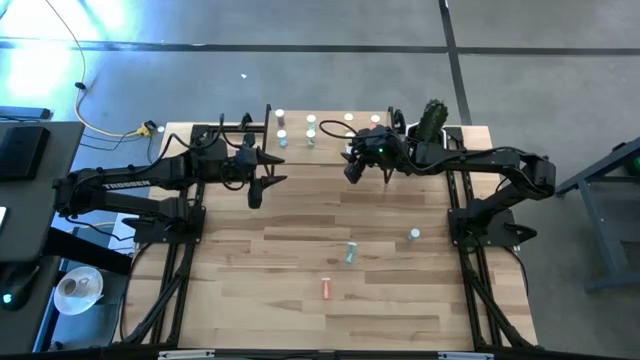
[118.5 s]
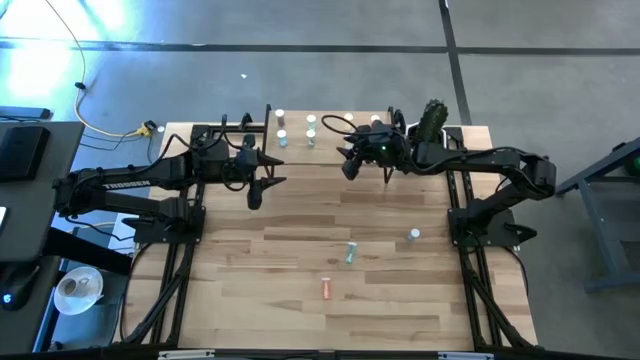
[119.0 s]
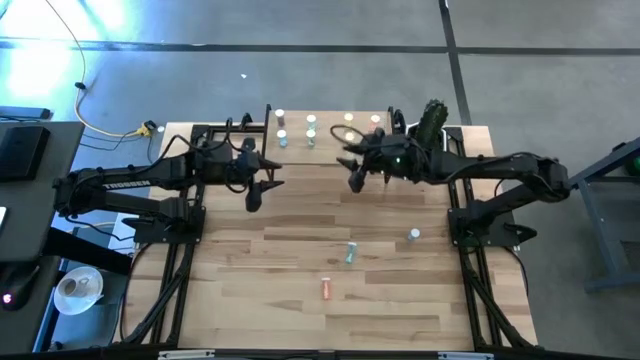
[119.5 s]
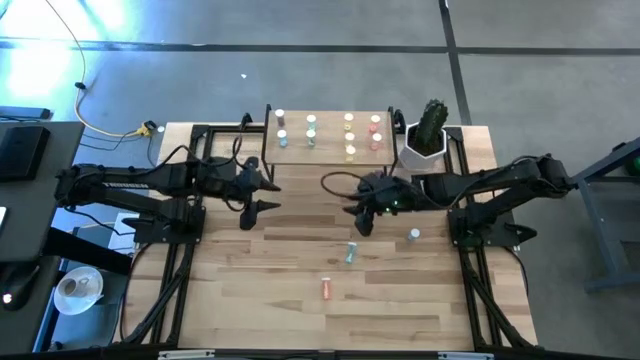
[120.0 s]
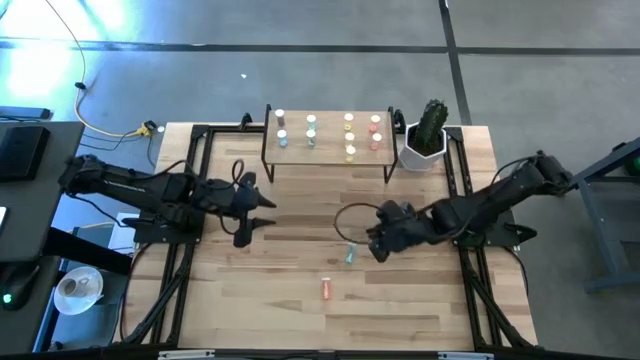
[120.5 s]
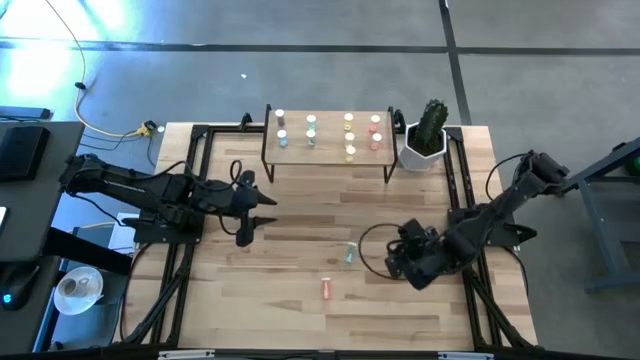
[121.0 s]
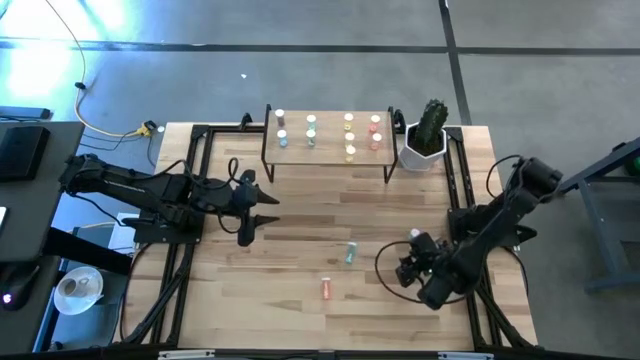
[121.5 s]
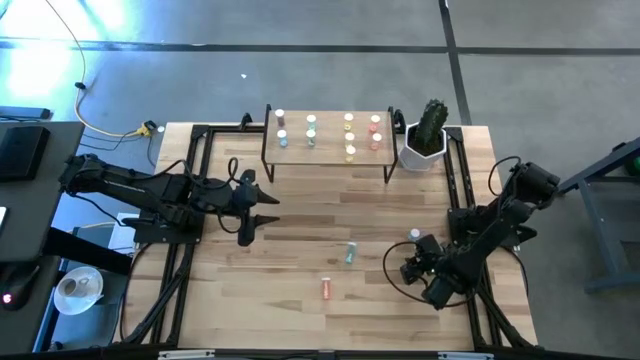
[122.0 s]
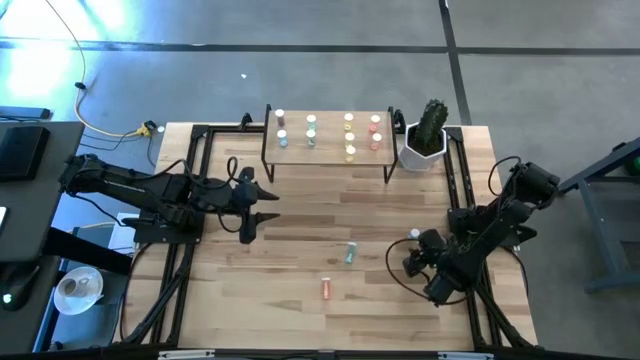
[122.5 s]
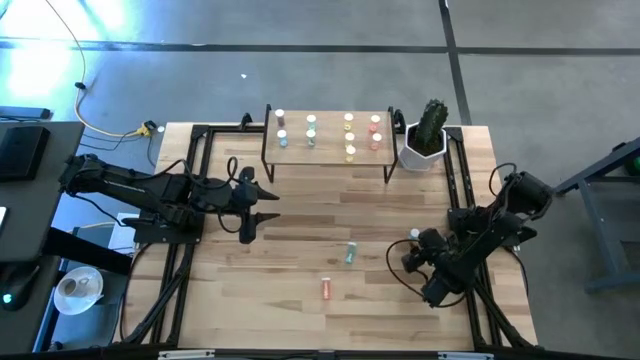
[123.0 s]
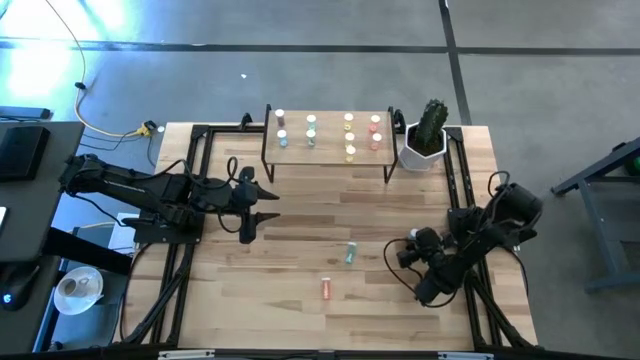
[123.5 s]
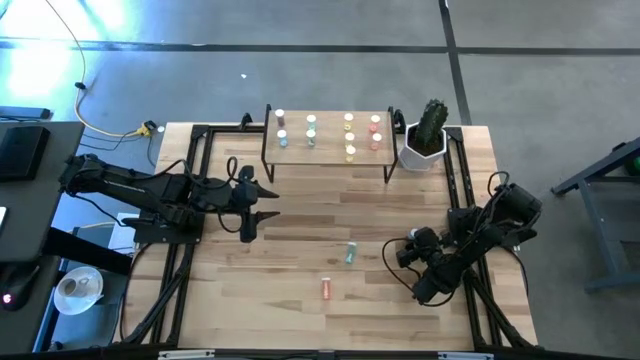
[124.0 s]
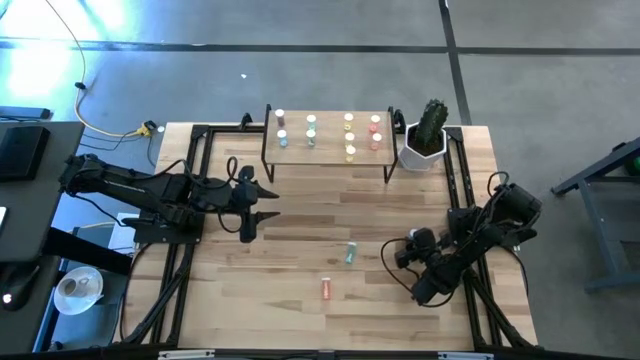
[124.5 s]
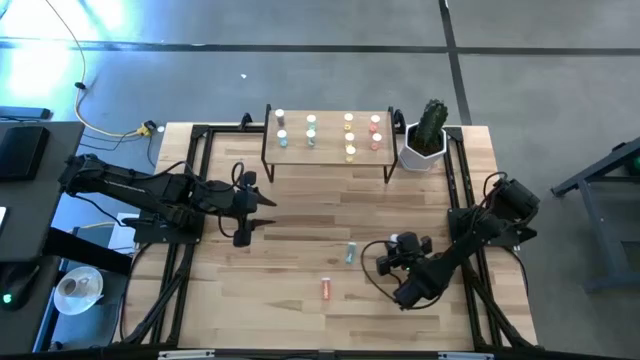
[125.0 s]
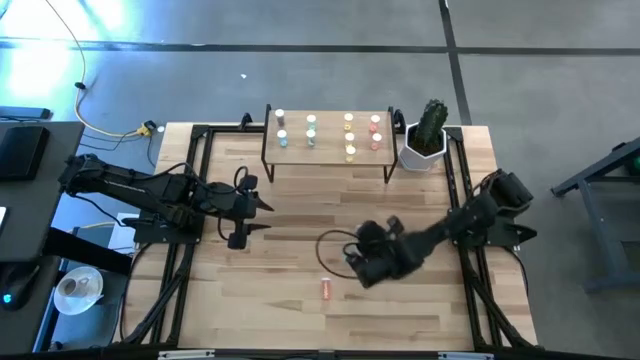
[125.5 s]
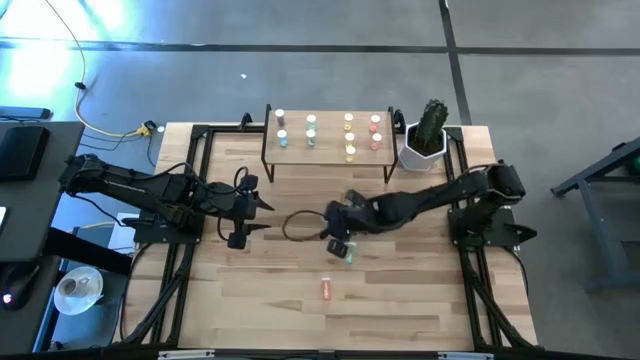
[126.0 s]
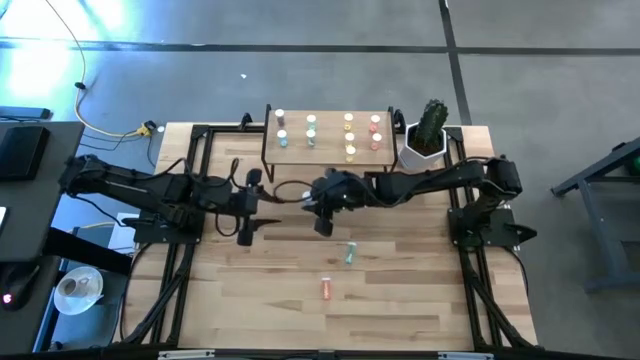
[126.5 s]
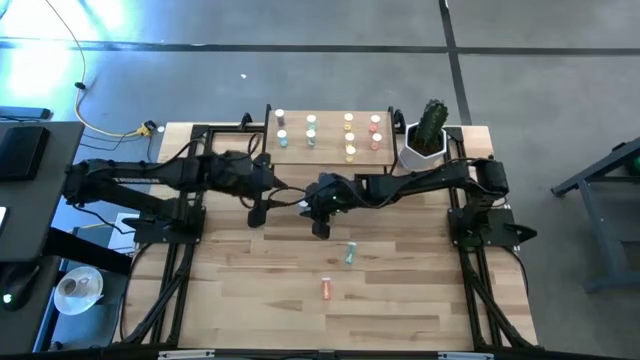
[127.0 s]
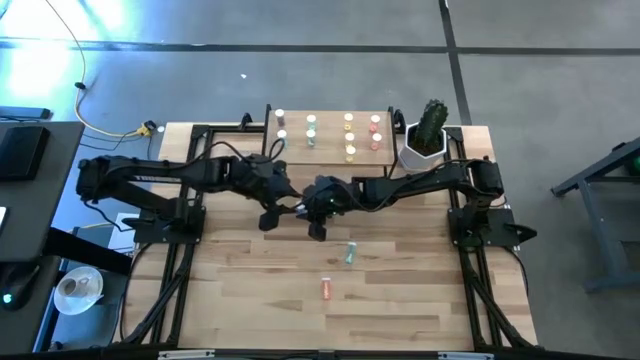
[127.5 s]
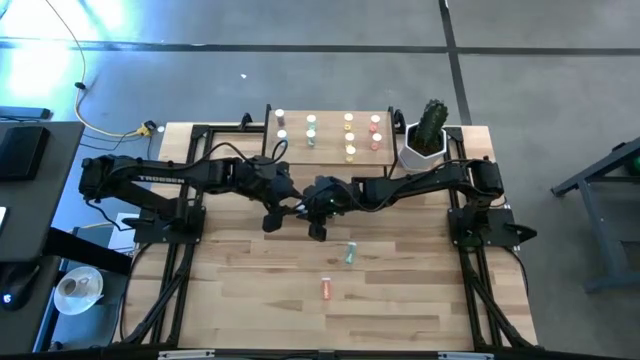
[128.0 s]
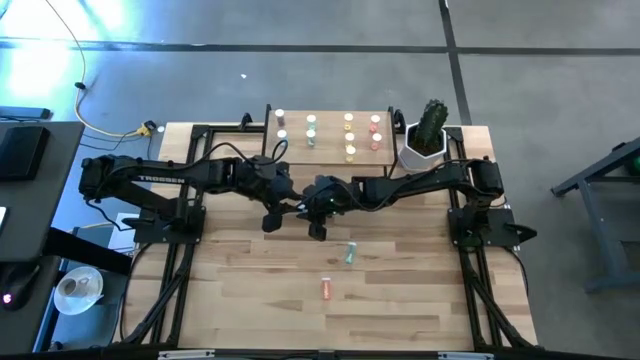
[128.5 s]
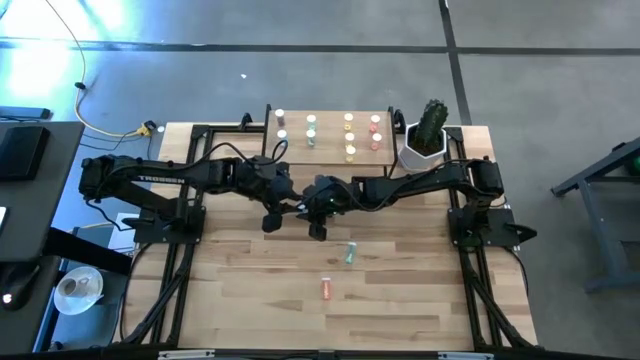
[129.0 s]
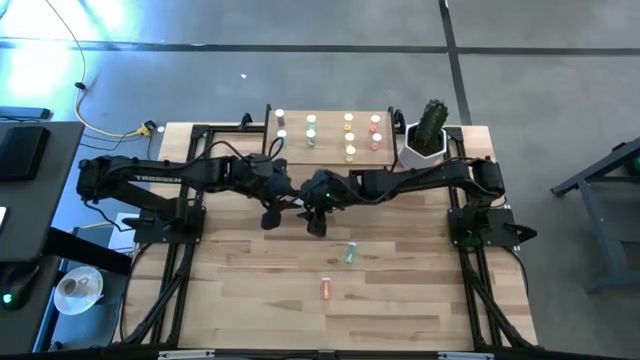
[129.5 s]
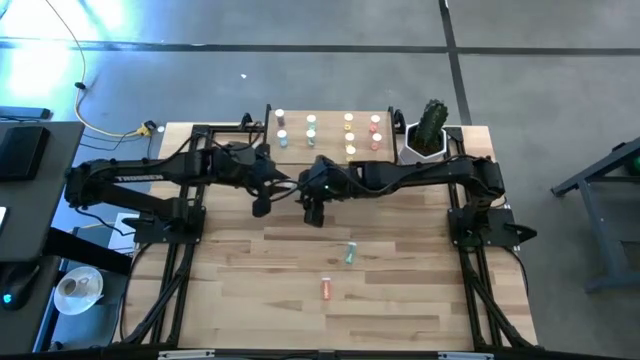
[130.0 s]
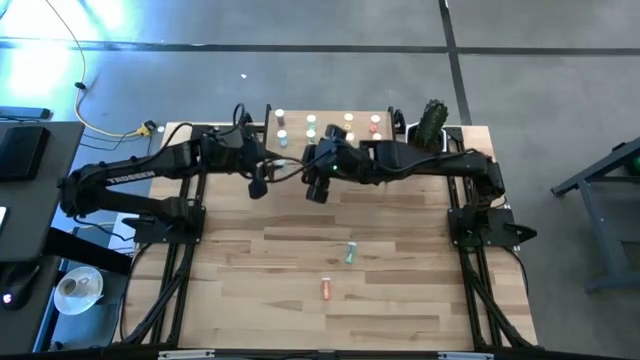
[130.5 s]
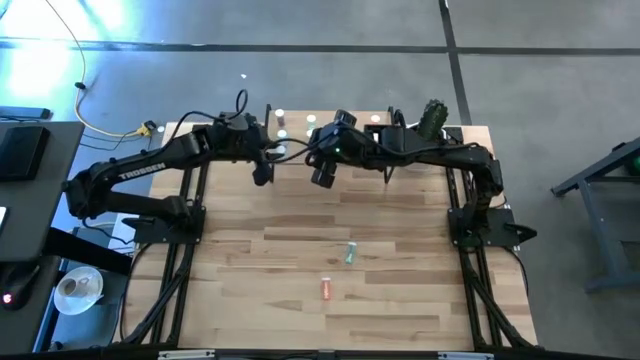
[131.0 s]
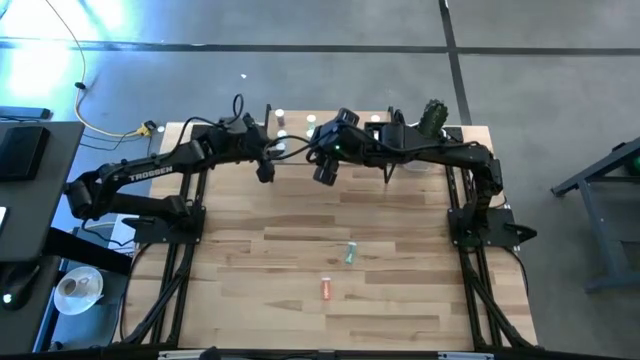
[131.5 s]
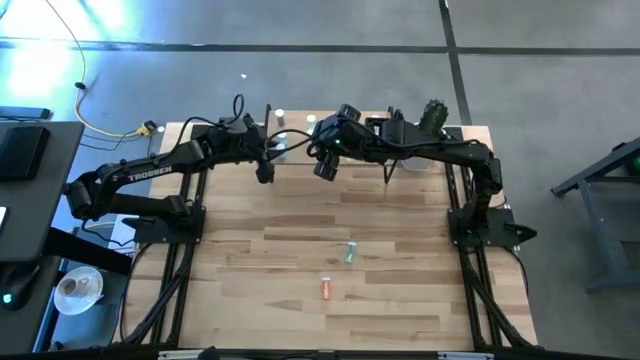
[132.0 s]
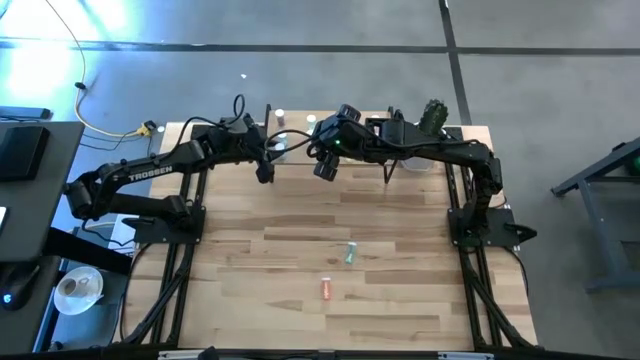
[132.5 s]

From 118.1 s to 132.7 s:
Task: Pick and place medicine bottles onto shelf by color
Put the right blue pill bottle on the shelf aligned with the other blue pill bottles

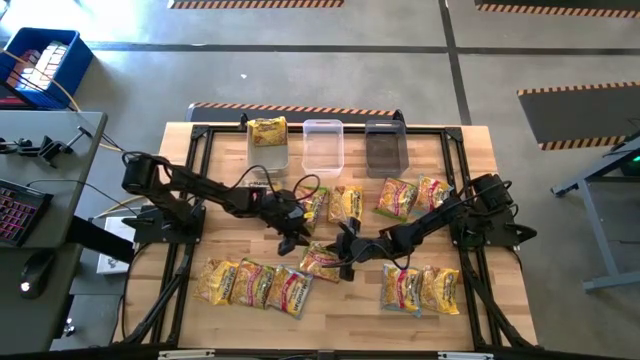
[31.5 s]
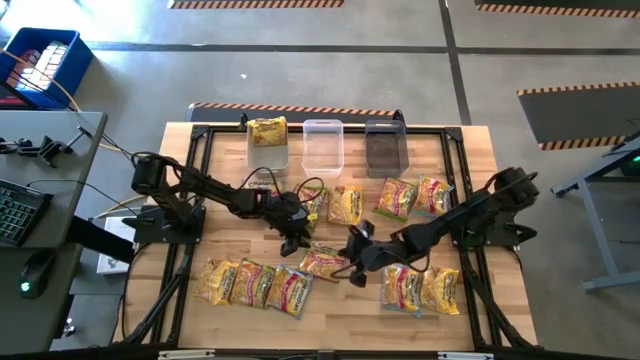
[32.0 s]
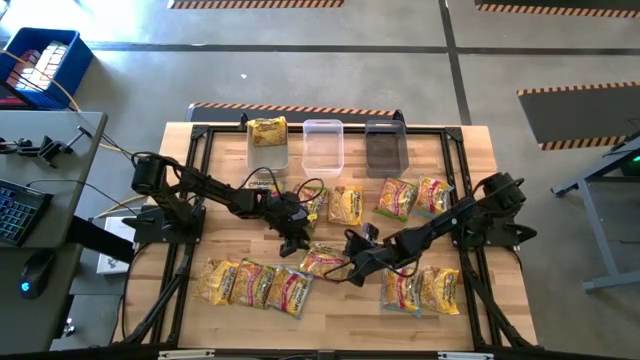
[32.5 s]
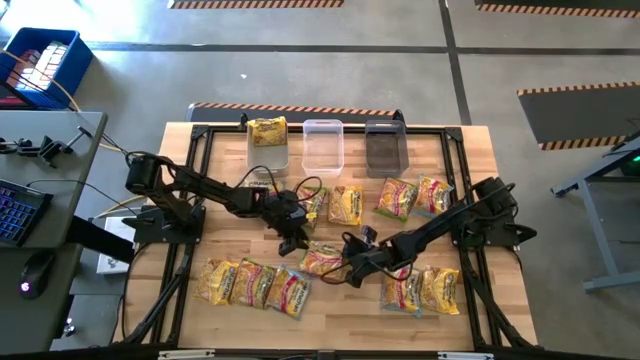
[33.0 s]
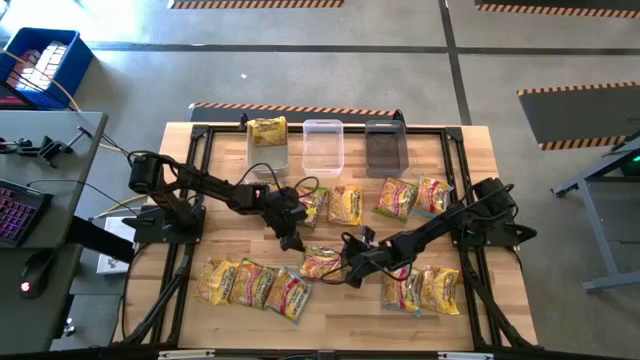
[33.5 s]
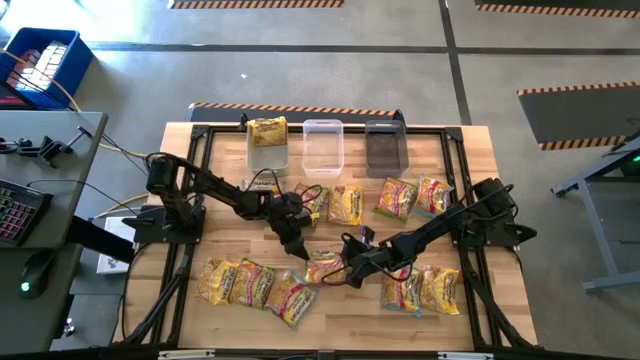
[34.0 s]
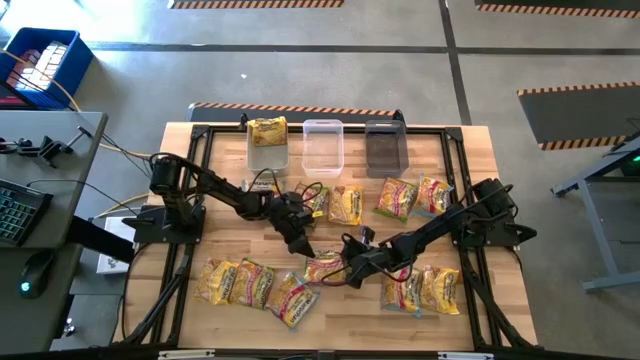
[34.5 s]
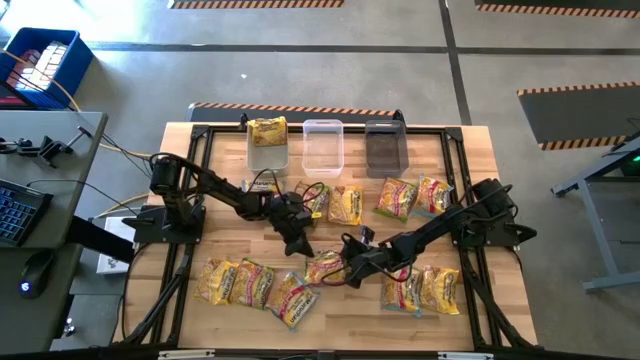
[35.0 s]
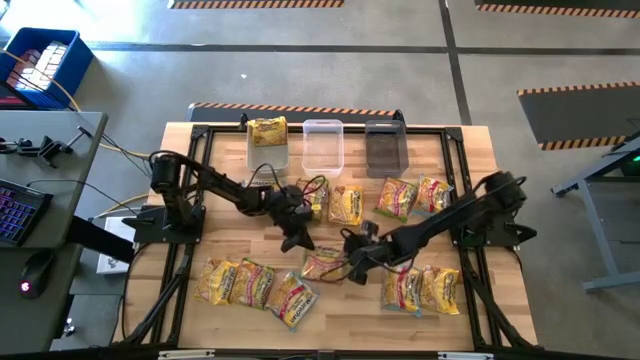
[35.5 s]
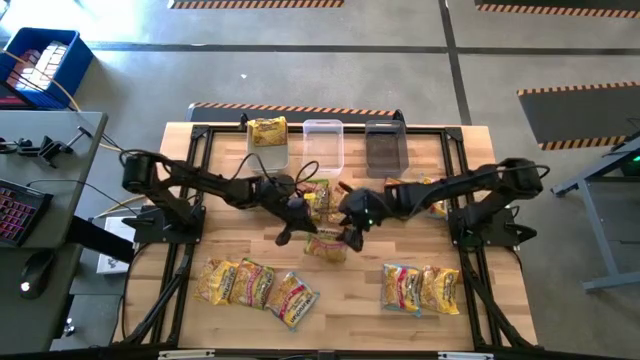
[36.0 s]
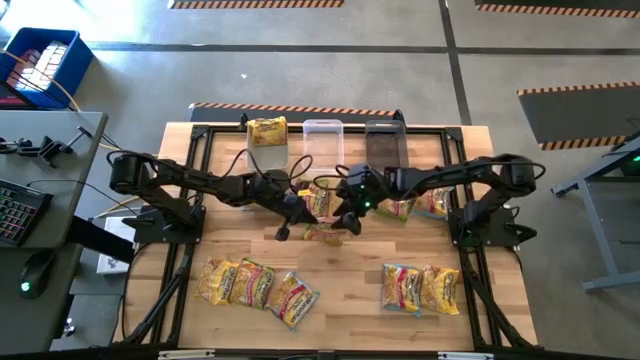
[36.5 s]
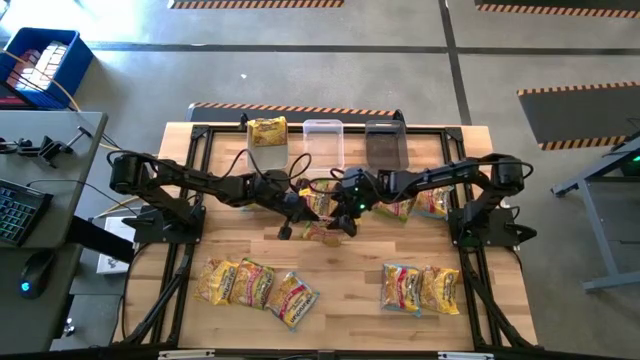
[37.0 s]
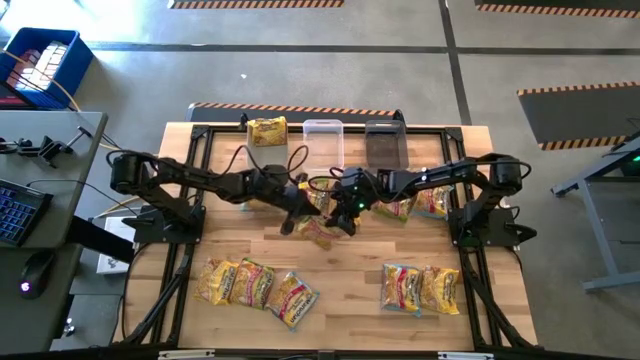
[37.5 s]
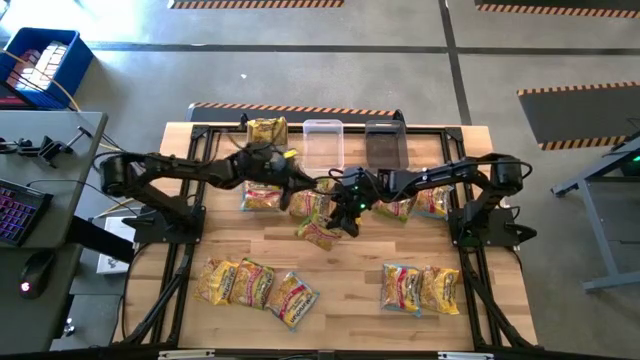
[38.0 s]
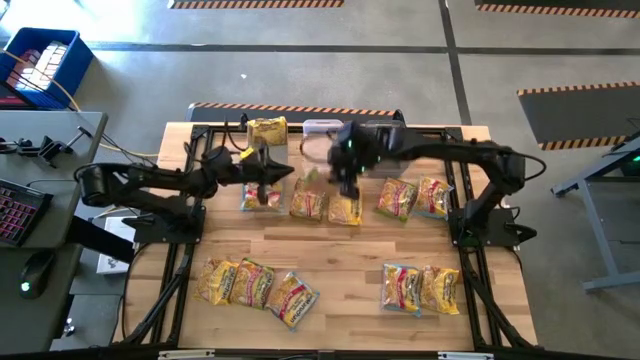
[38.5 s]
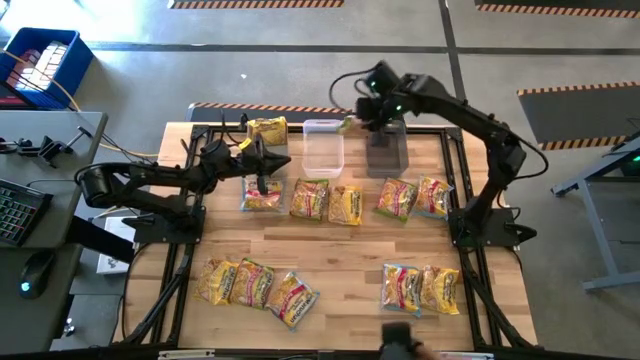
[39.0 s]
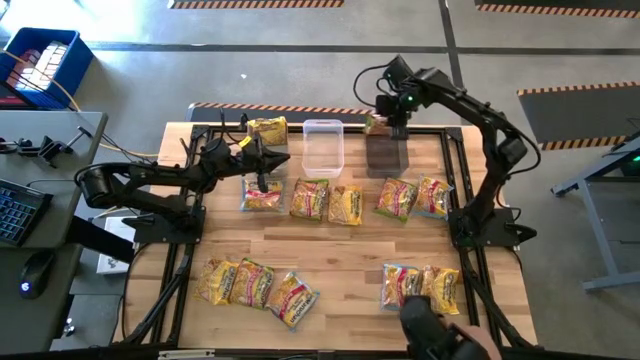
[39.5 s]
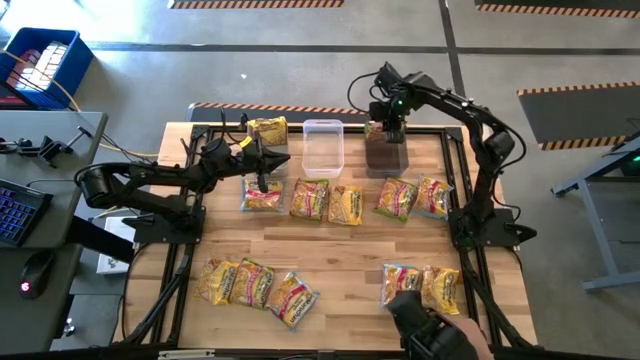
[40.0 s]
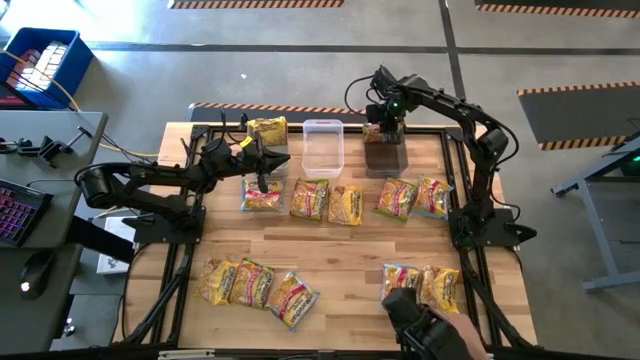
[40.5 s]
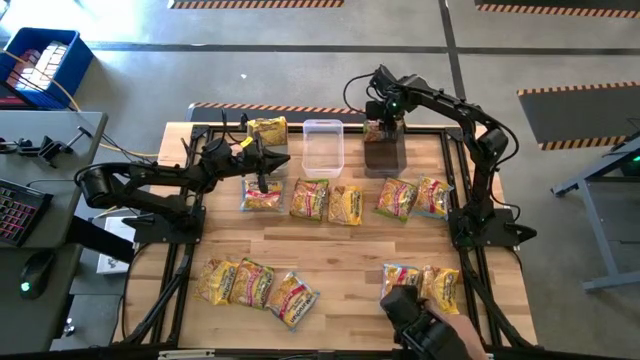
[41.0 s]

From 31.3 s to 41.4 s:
Task: Sort Maruchan noodles
Put the bottom middle green noodle pack into the transparent black bin
